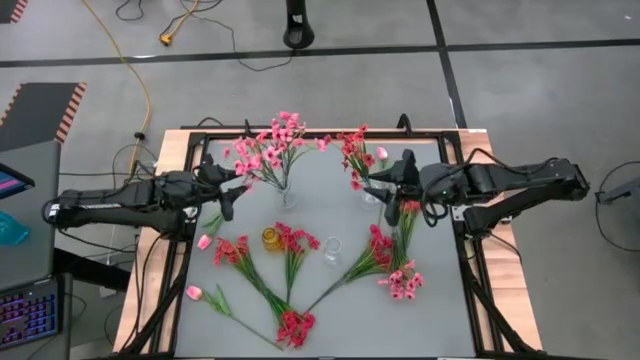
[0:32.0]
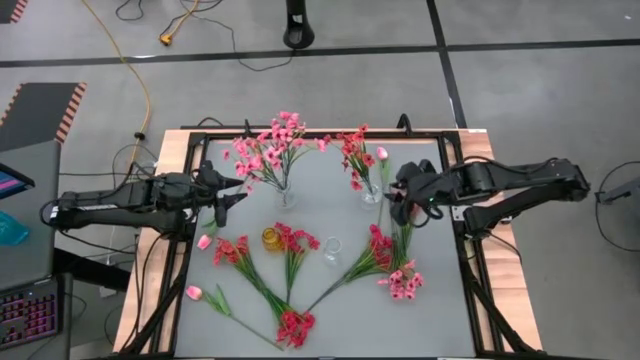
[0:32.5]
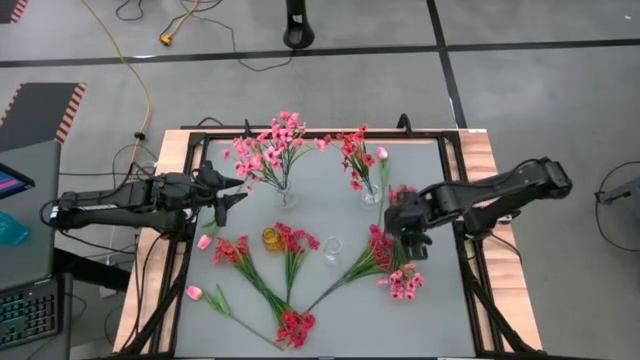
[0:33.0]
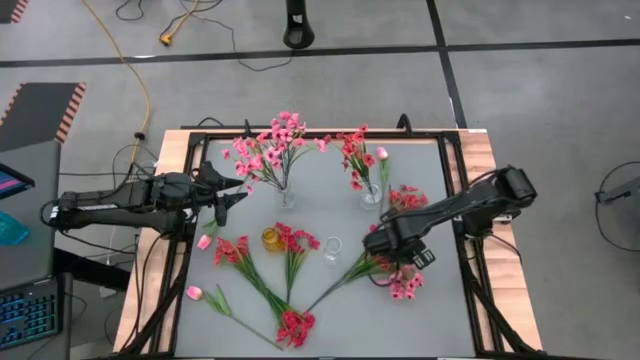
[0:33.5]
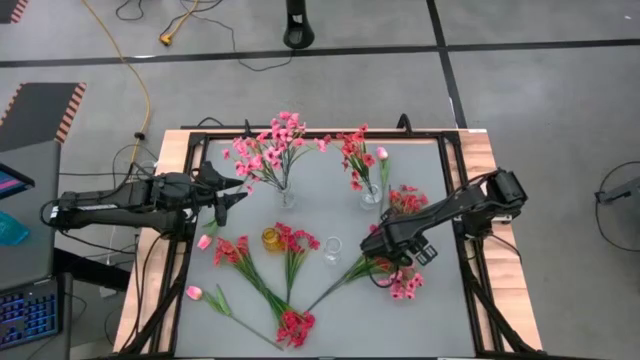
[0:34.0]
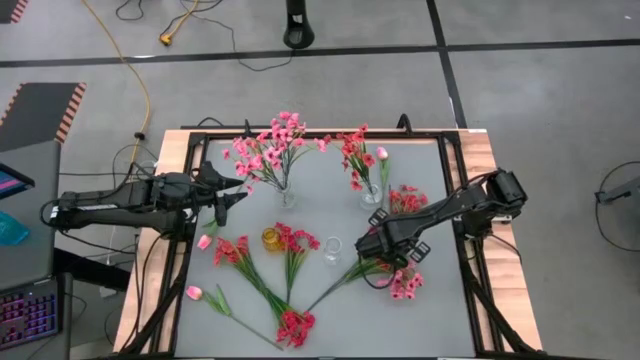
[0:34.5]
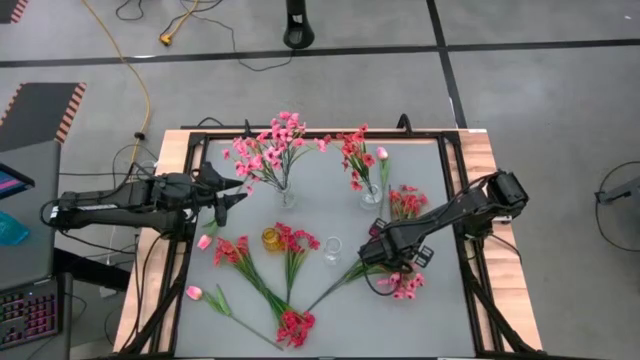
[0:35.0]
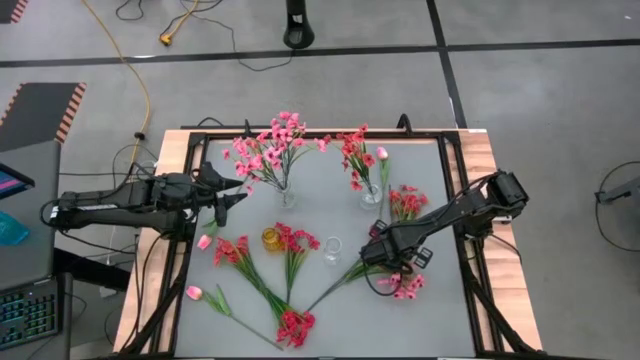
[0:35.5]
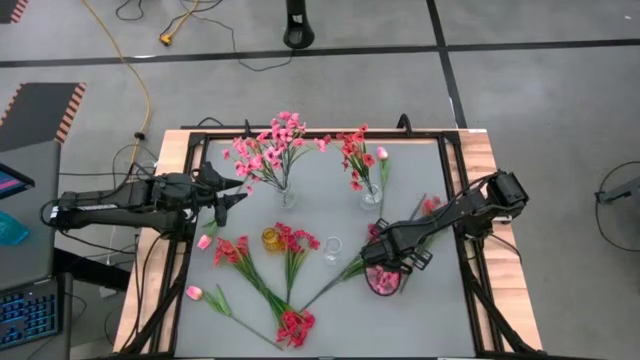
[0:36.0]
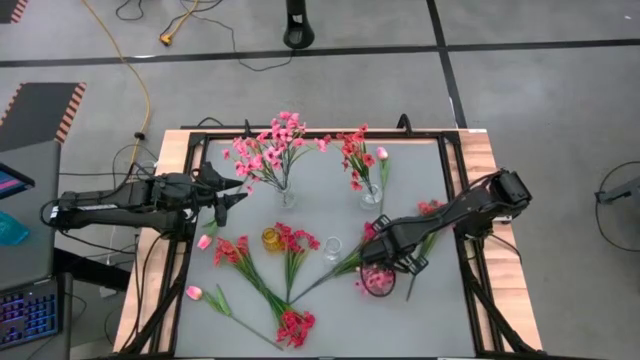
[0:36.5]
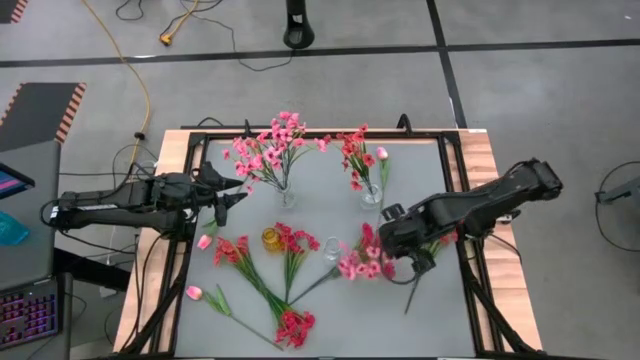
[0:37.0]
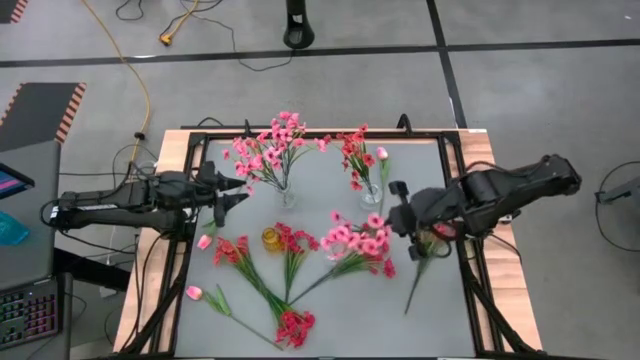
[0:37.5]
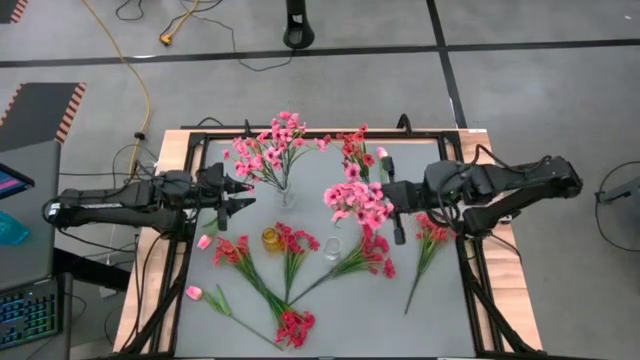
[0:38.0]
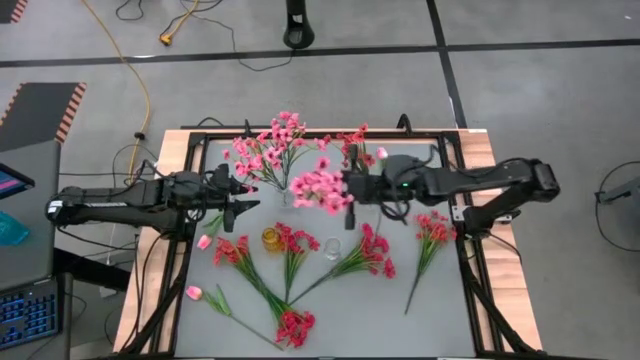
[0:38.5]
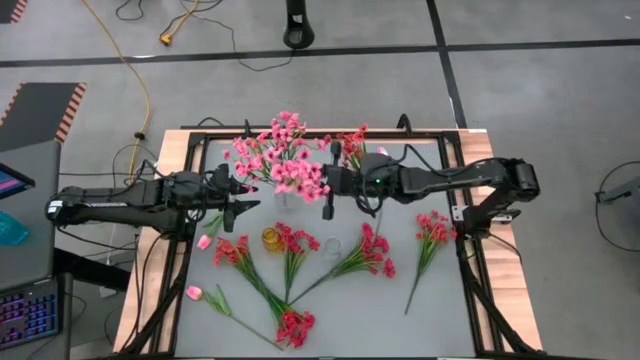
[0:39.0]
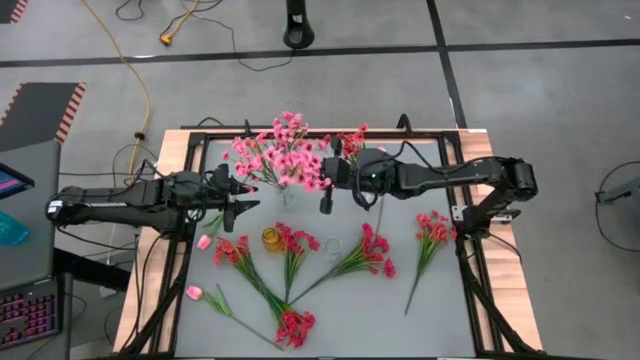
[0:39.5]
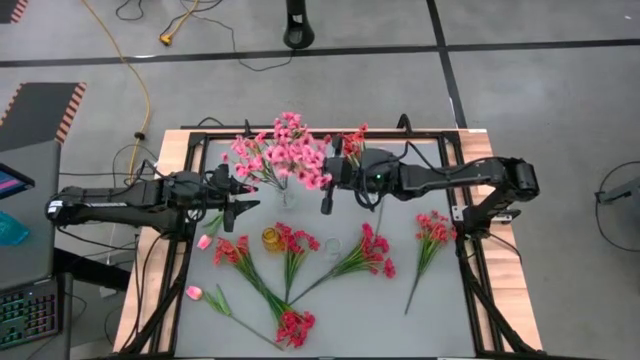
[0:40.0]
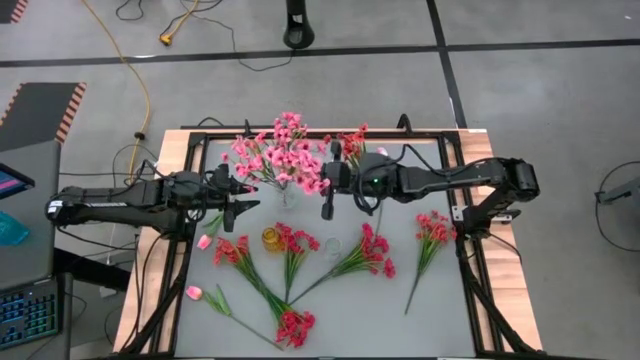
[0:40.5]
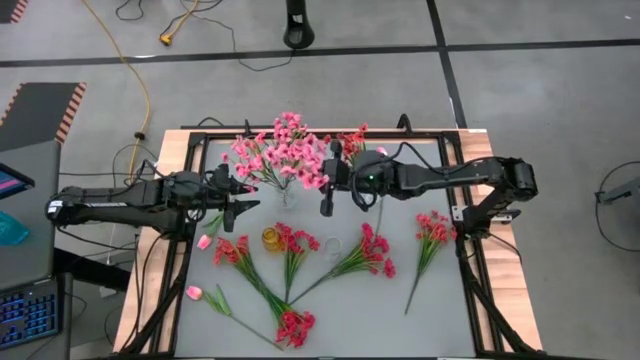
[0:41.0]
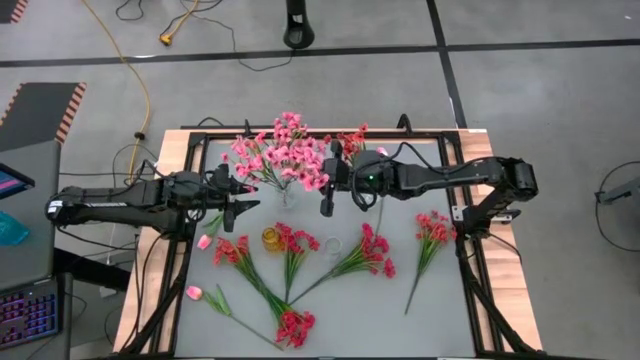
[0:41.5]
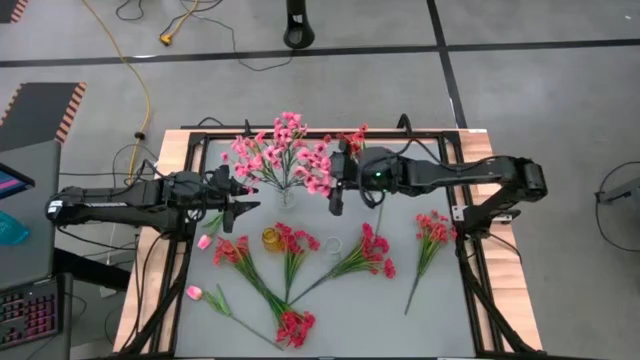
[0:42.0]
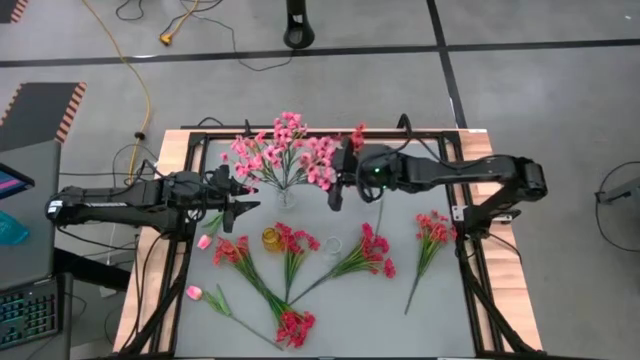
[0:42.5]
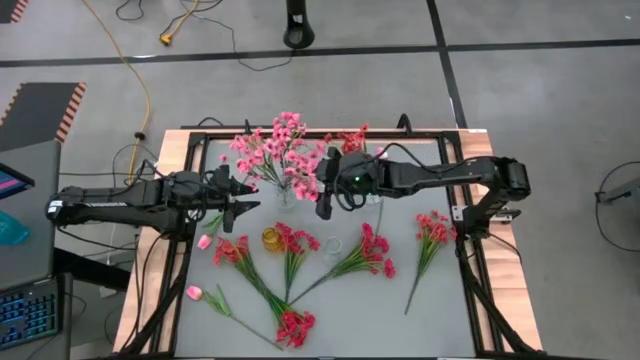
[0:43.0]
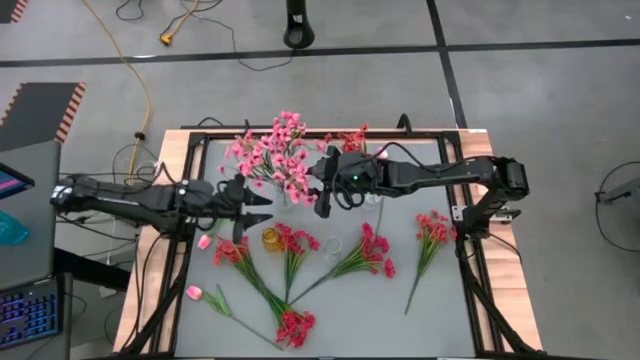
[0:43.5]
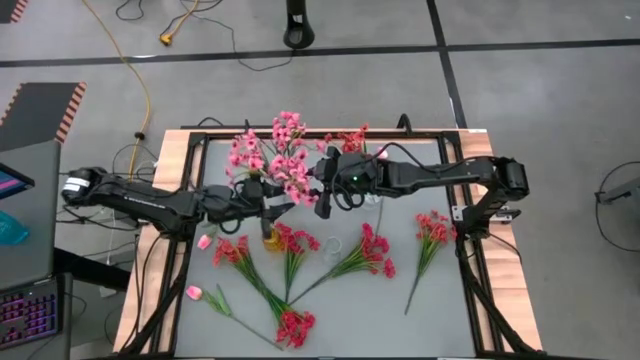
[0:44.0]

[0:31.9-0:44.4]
Task: Sort flowers into vase by color
Put the pink flowers into the top left transparent vase

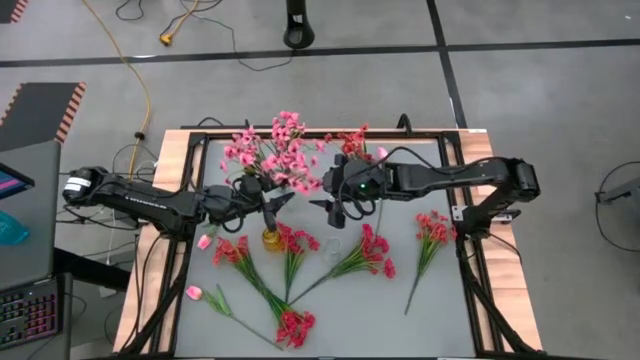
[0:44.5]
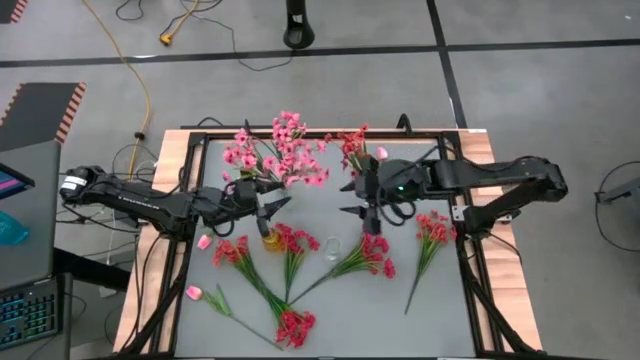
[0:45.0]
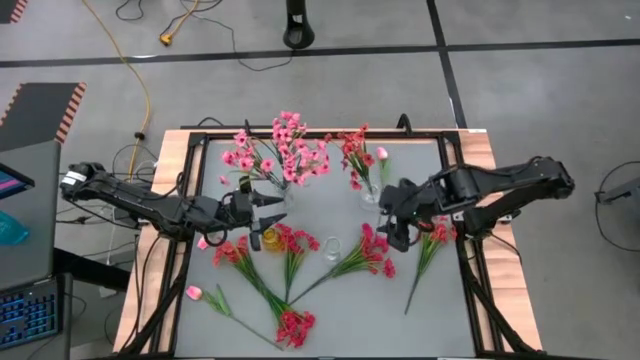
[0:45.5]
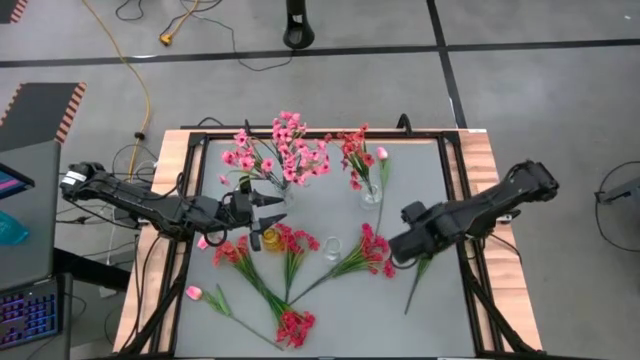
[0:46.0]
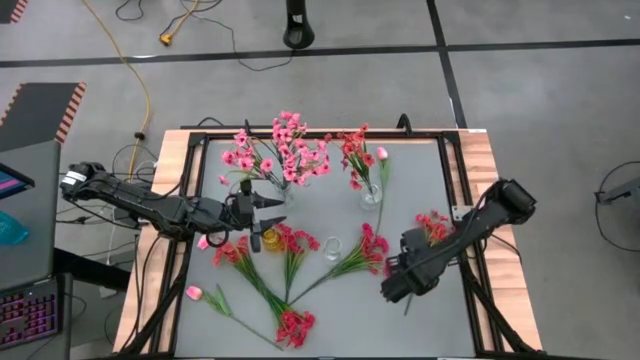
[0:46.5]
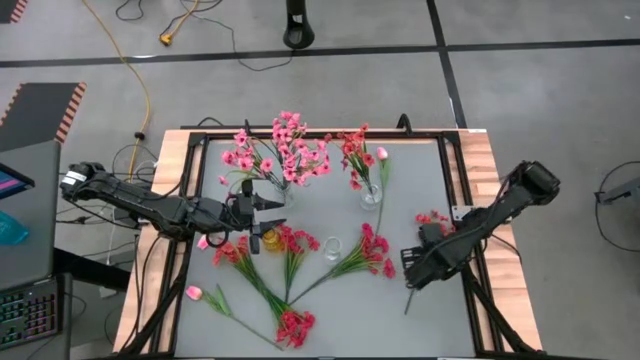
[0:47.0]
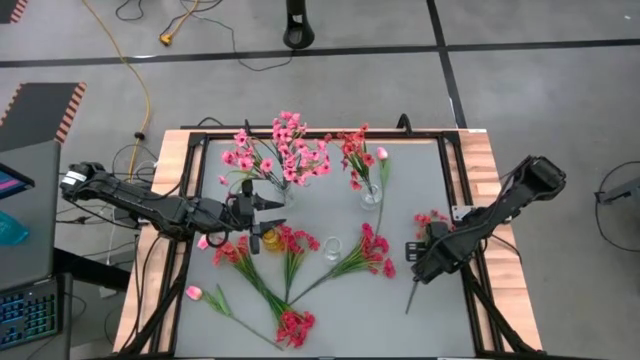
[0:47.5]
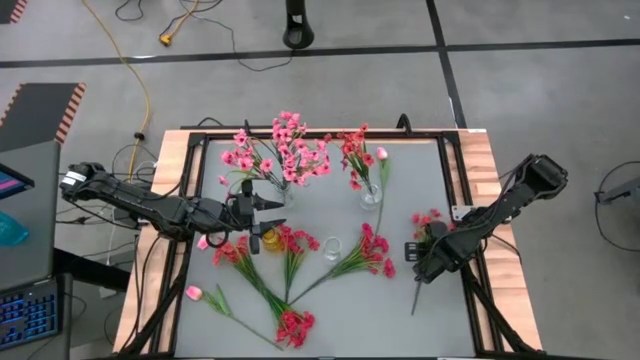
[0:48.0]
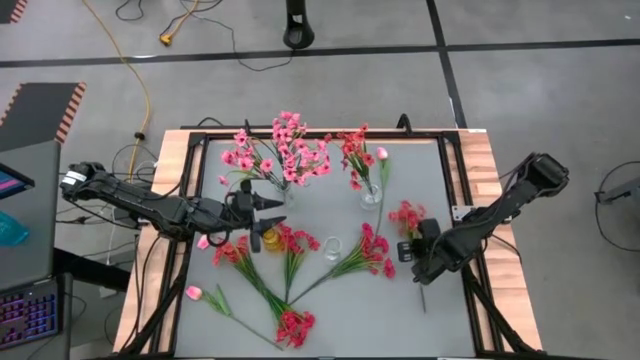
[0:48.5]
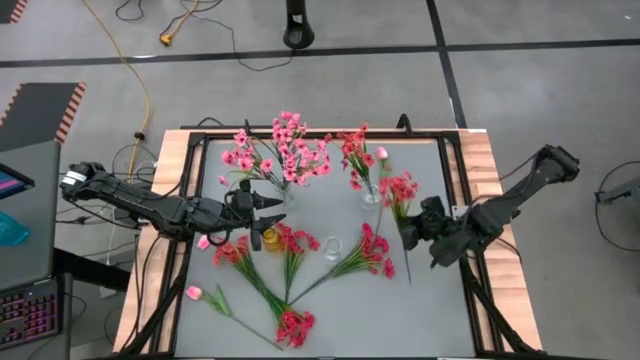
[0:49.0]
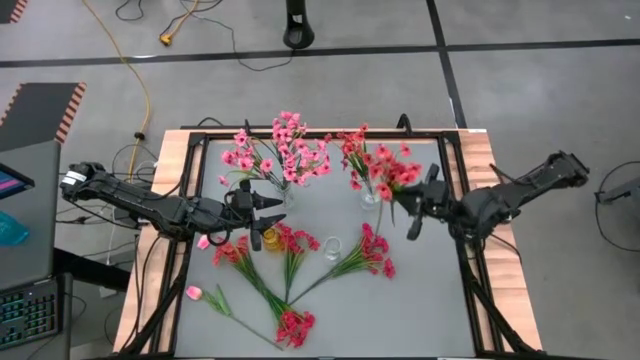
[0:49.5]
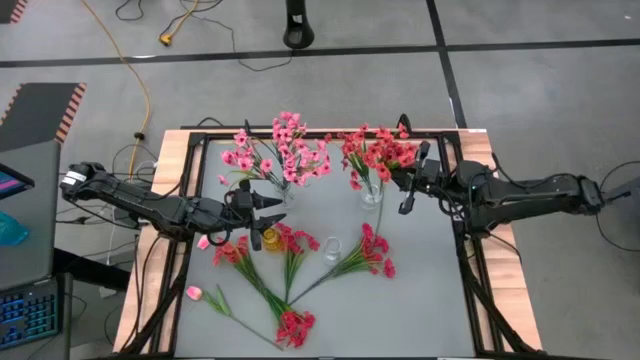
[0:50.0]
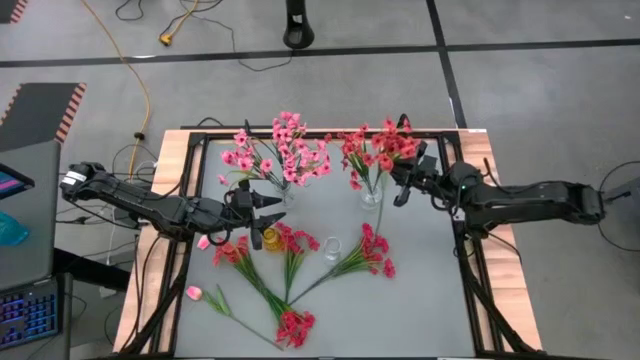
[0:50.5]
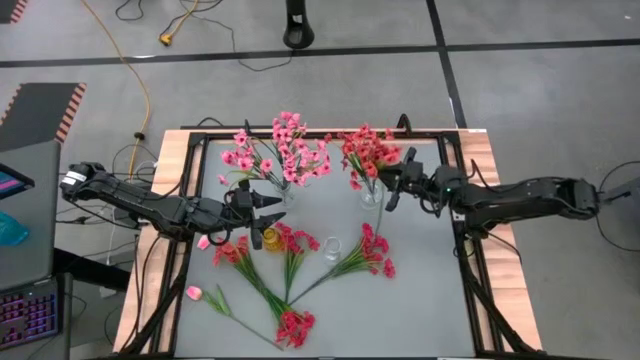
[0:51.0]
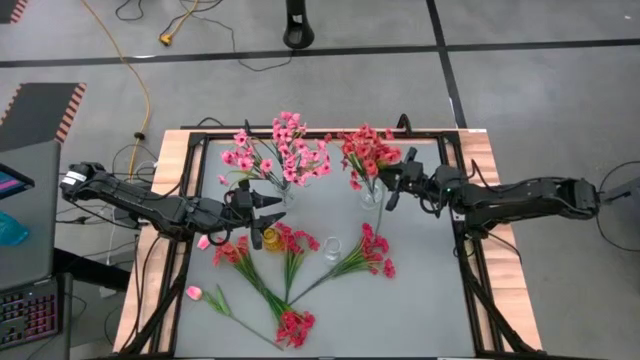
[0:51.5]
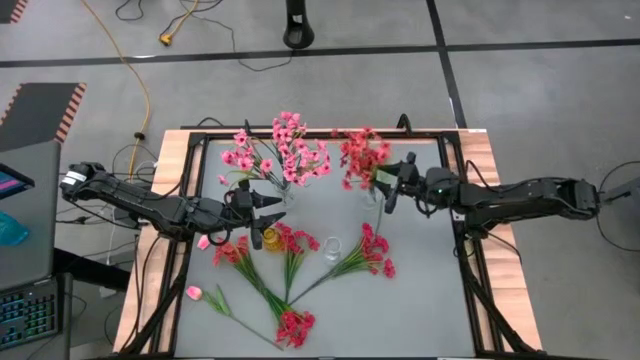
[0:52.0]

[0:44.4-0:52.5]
Put the right orange flowers into the top right transparent vase

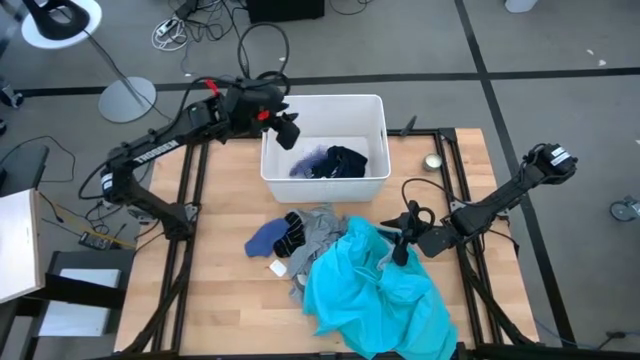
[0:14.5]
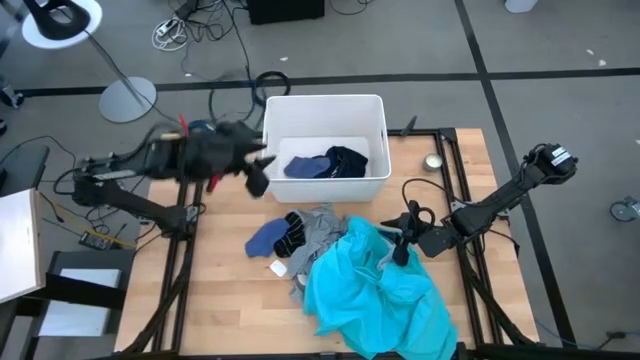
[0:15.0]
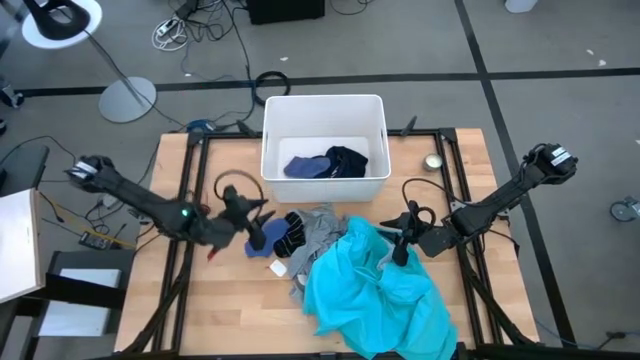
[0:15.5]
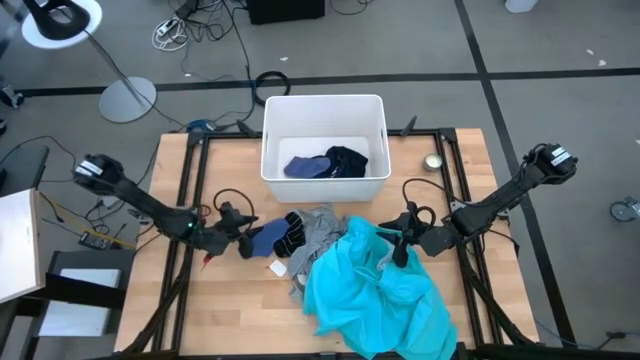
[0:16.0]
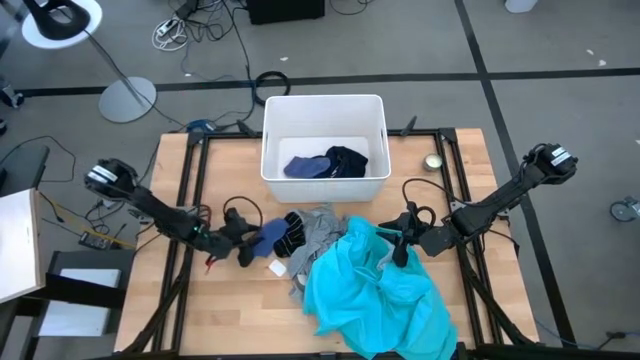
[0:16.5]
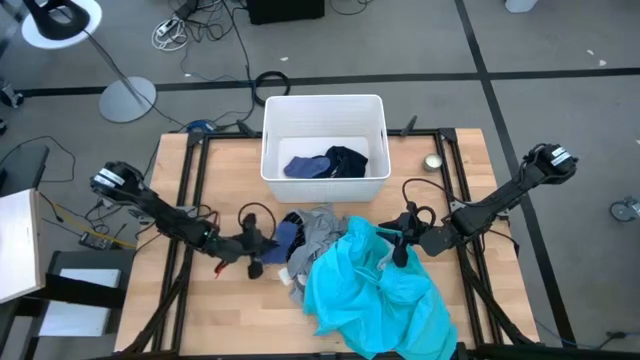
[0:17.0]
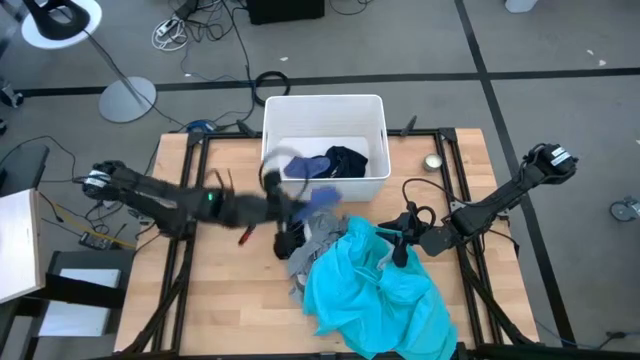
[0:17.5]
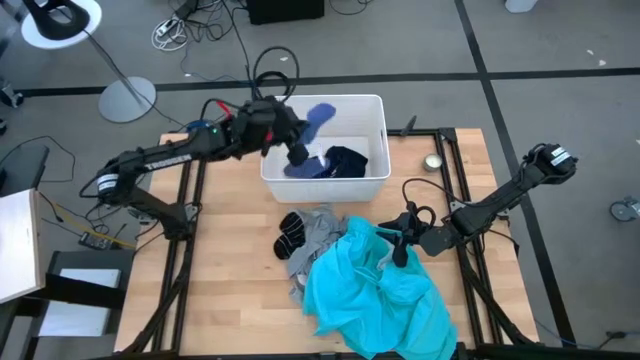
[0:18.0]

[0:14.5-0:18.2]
Task: Sort clothes
Put the blue sock into the white bin
